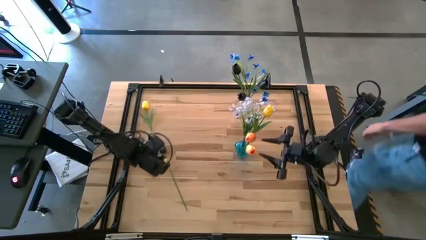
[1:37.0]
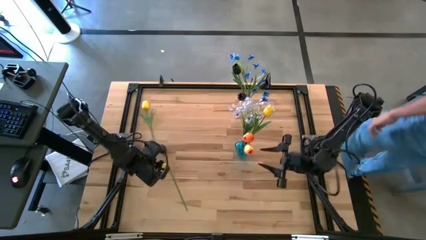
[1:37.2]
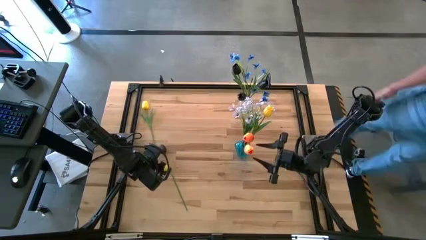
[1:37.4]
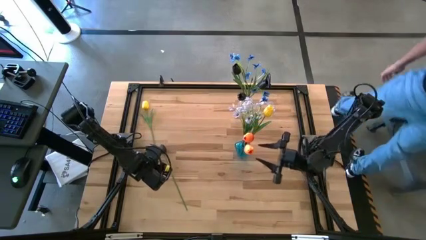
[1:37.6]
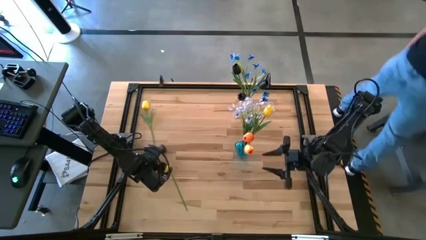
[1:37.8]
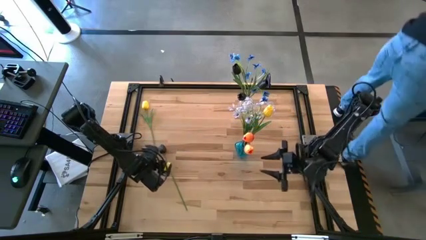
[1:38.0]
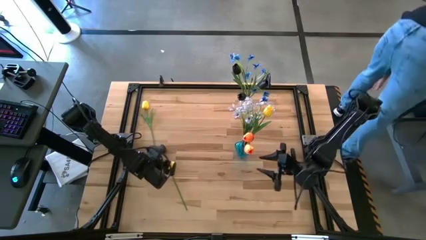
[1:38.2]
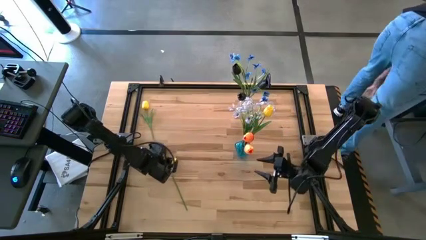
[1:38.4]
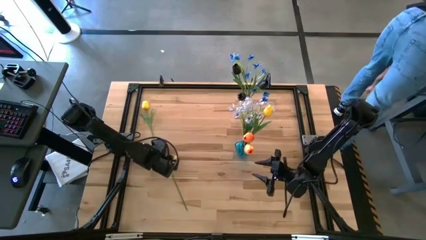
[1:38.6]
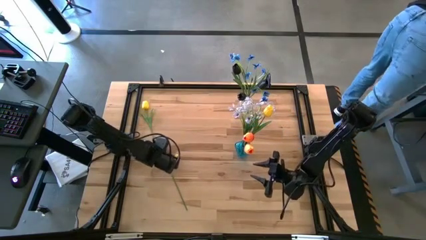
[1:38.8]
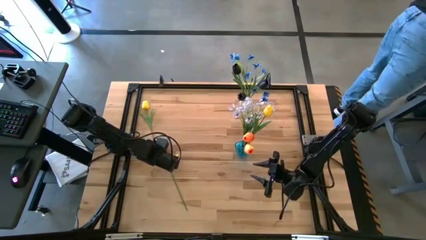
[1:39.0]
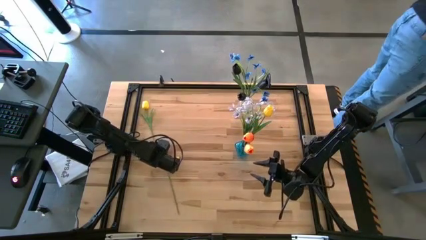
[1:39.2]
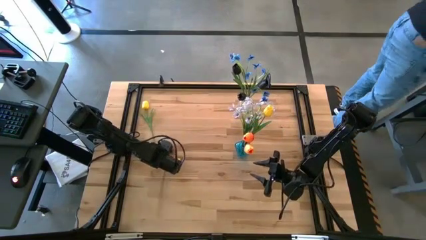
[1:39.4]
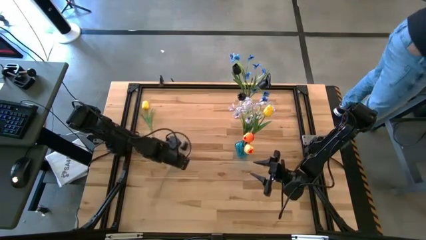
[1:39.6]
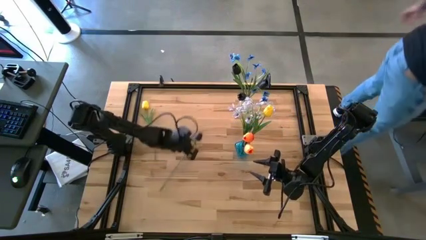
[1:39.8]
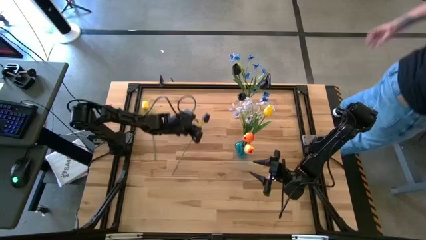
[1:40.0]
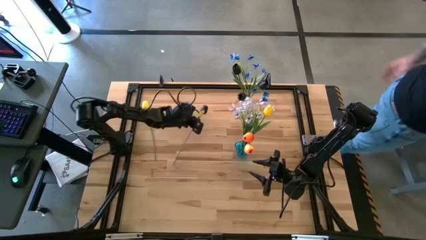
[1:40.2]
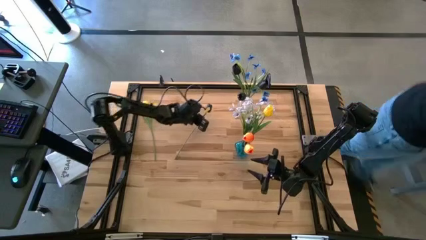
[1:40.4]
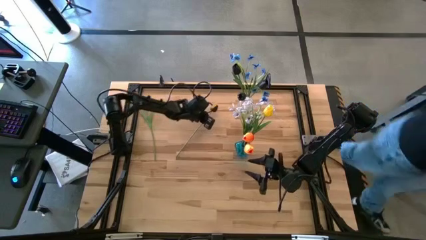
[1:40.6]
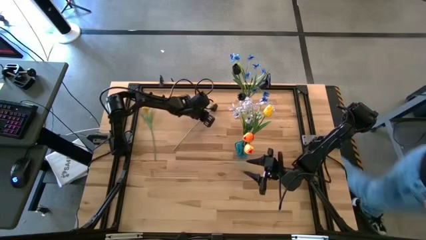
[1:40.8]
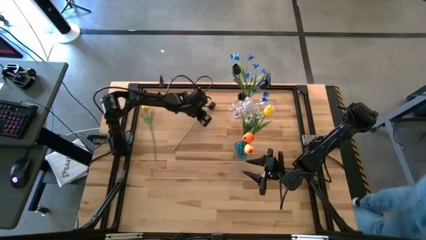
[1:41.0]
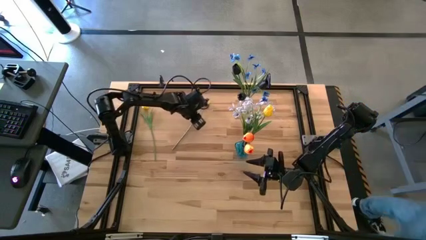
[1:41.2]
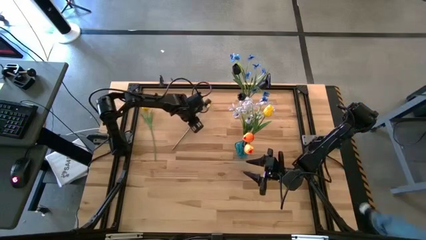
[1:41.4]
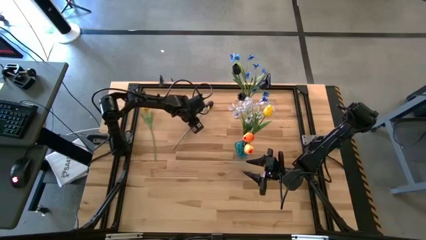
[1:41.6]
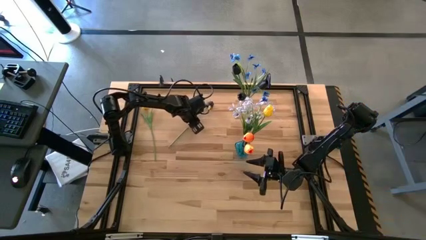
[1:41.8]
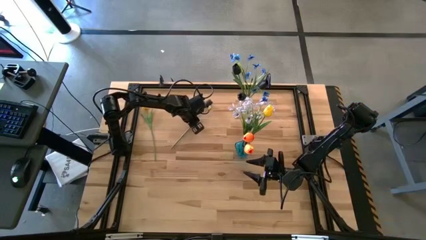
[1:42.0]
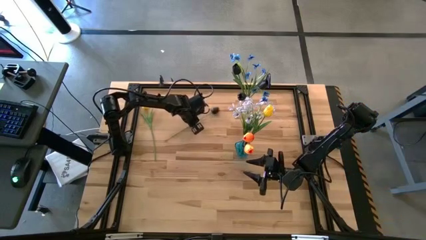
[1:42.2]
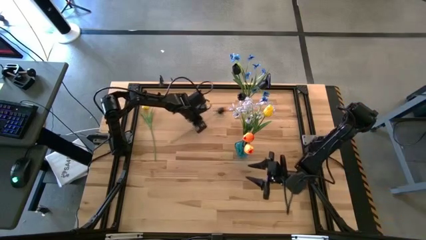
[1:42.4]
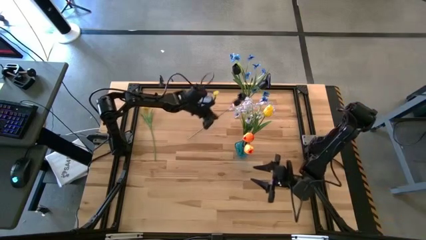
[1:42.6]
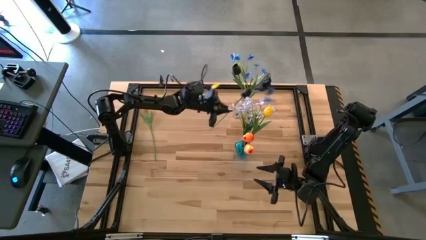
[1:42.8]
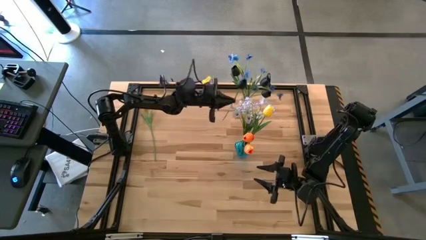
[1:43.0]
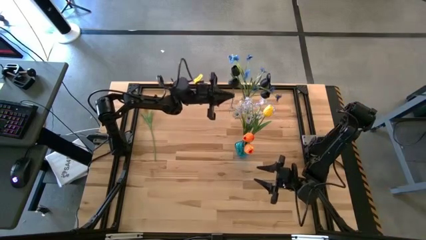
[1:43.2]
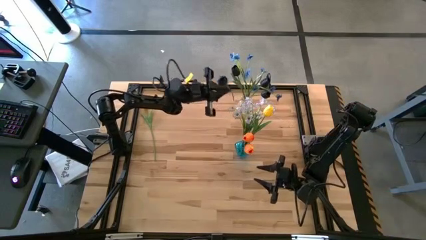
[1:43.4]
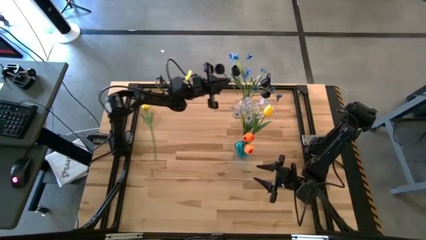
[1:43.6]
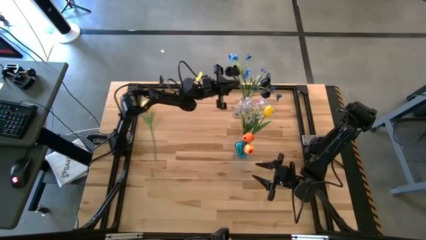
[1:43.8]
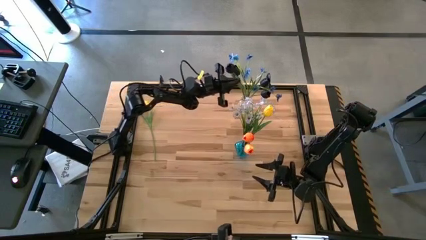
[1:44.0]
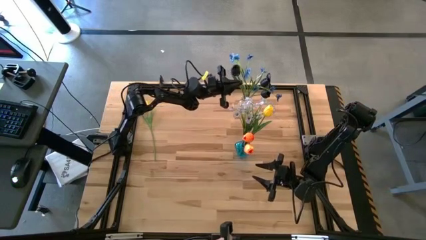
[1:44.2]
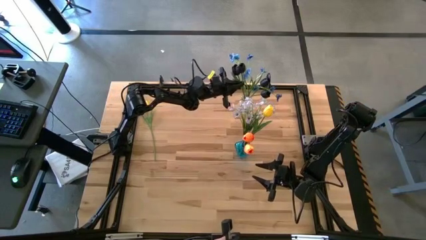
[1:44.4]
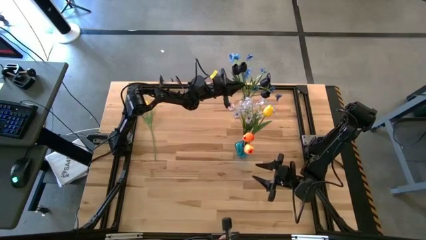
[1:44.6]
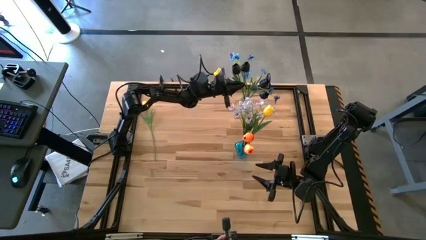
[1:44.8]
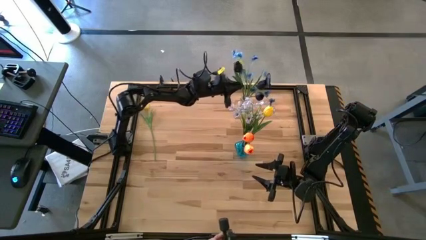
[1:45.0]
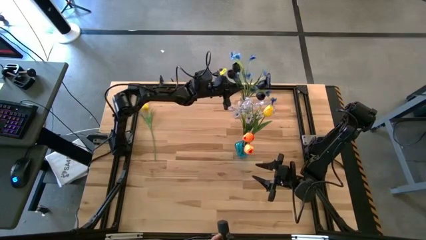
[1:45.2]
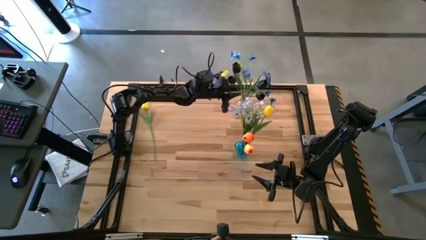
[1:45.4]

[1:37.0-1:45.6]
Task: Sort flowers into vase by color
Put the black tulip into the transparent flower vase

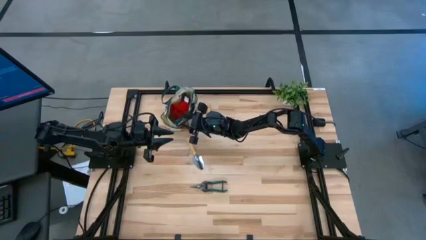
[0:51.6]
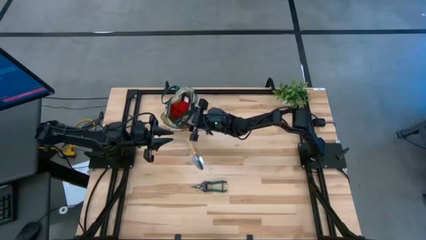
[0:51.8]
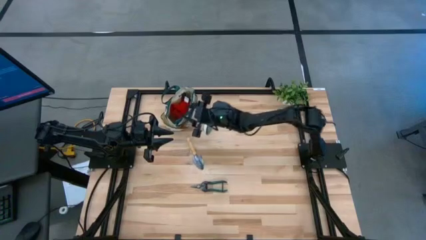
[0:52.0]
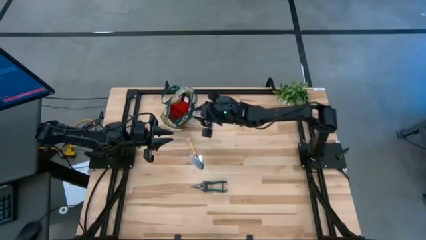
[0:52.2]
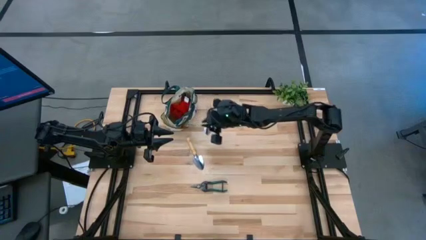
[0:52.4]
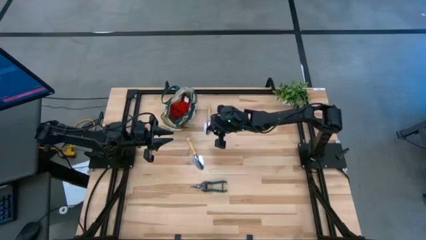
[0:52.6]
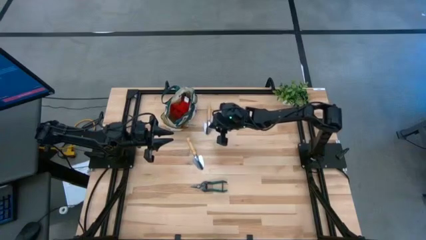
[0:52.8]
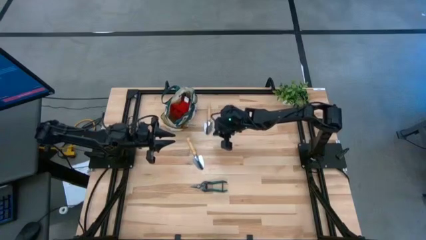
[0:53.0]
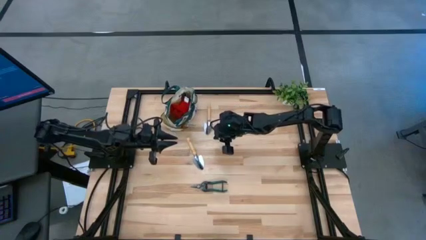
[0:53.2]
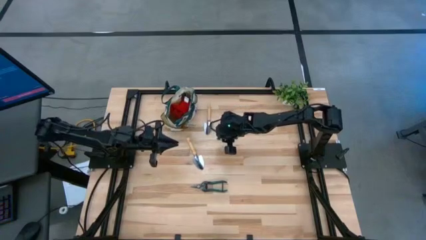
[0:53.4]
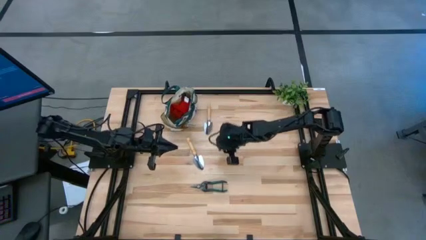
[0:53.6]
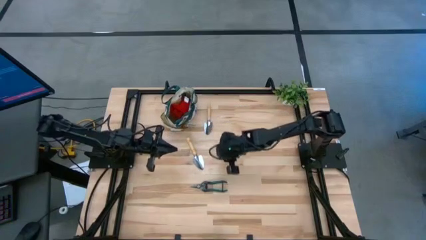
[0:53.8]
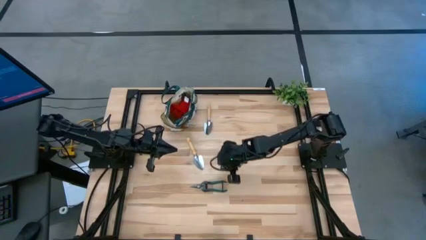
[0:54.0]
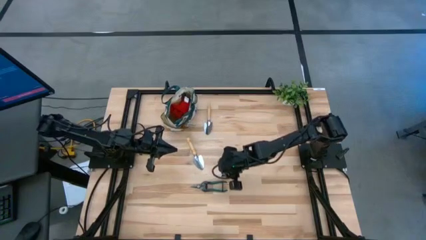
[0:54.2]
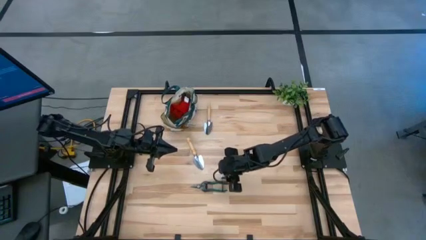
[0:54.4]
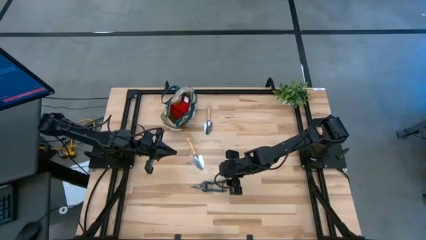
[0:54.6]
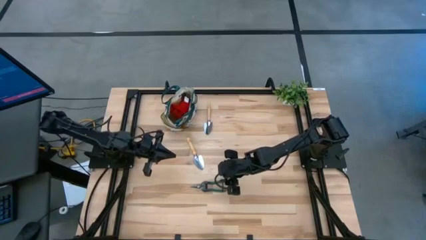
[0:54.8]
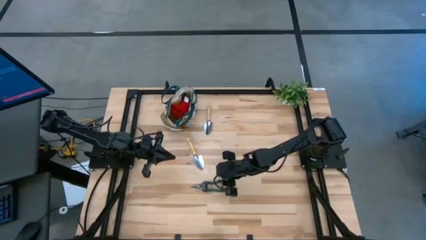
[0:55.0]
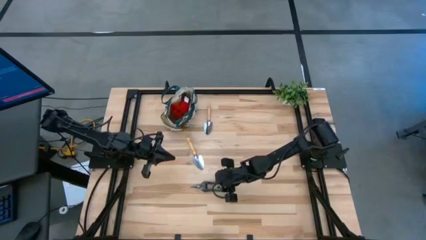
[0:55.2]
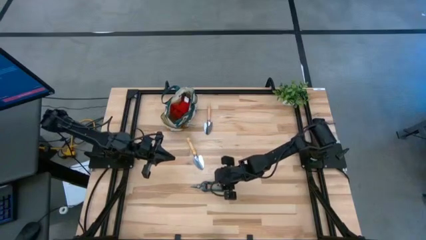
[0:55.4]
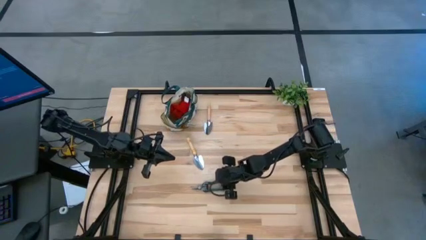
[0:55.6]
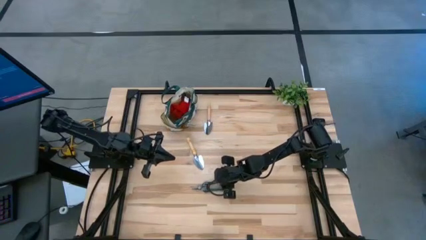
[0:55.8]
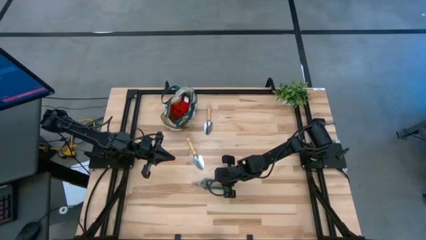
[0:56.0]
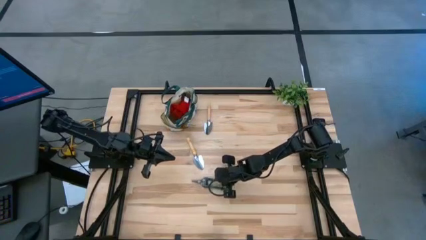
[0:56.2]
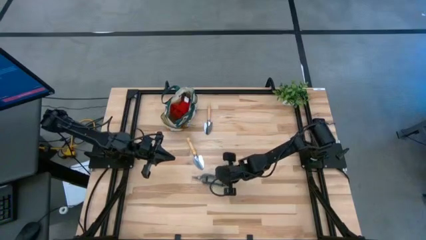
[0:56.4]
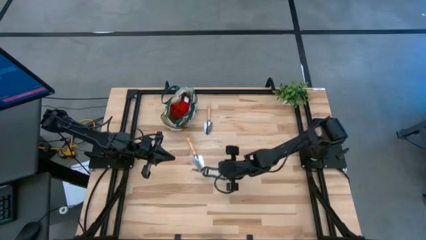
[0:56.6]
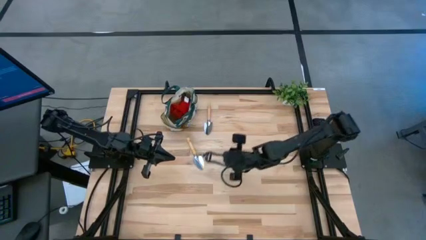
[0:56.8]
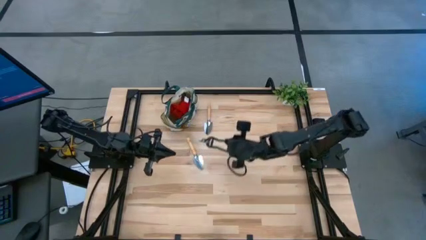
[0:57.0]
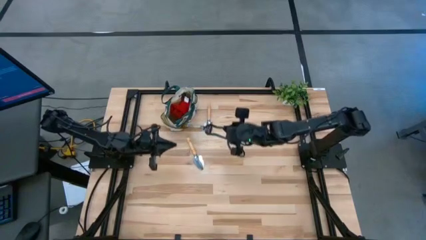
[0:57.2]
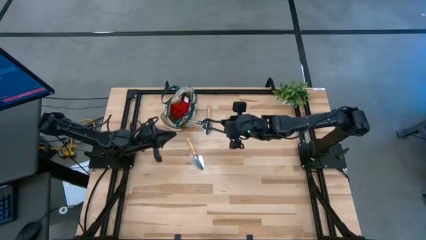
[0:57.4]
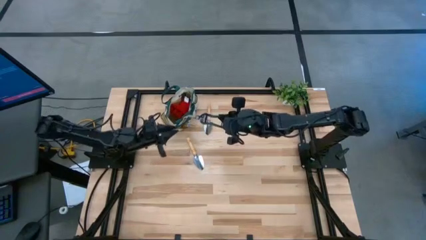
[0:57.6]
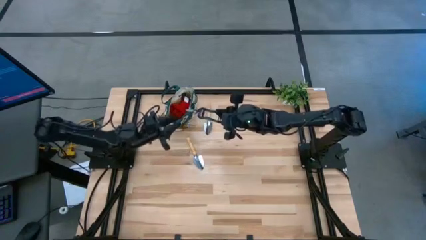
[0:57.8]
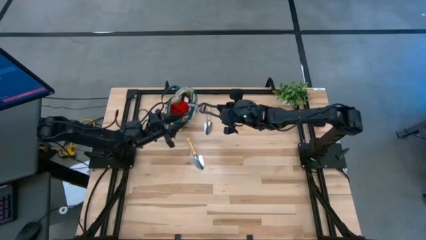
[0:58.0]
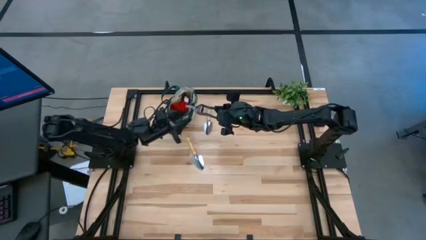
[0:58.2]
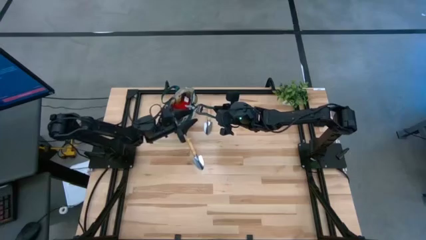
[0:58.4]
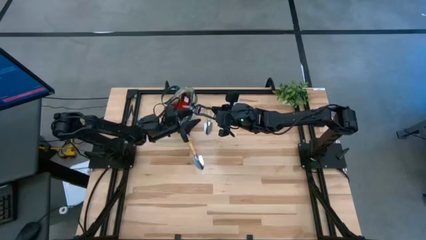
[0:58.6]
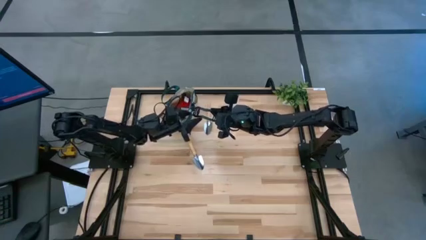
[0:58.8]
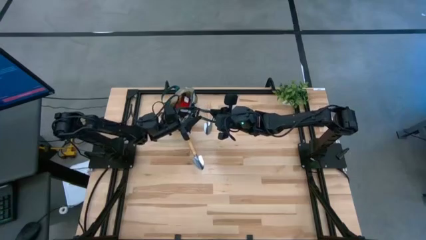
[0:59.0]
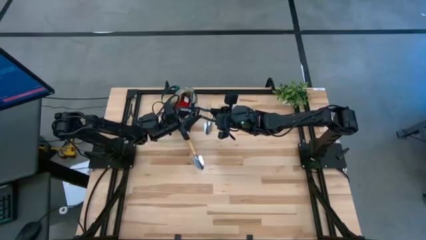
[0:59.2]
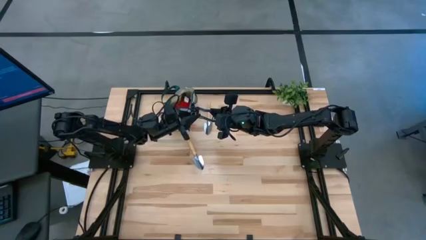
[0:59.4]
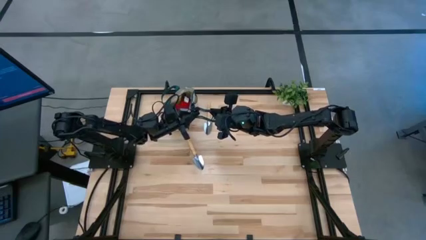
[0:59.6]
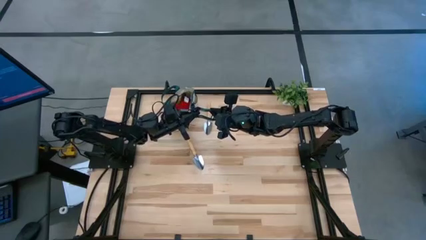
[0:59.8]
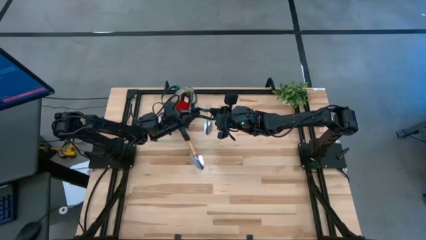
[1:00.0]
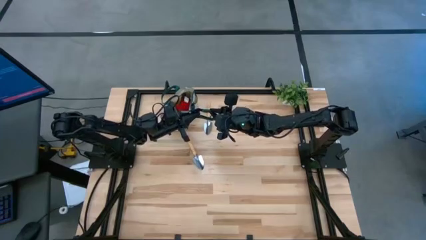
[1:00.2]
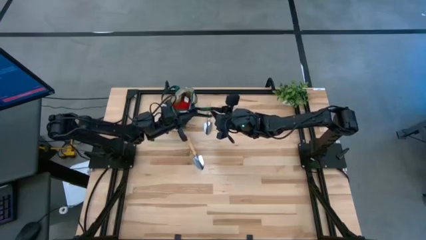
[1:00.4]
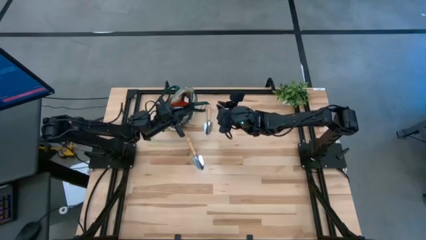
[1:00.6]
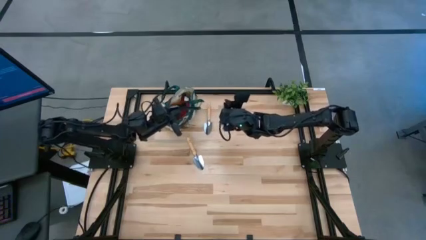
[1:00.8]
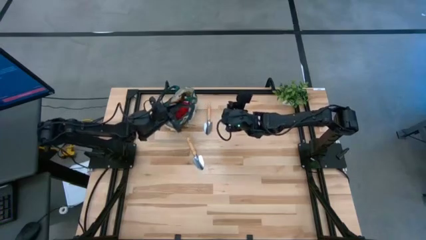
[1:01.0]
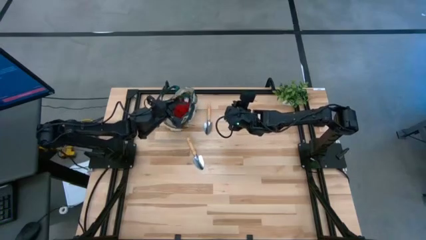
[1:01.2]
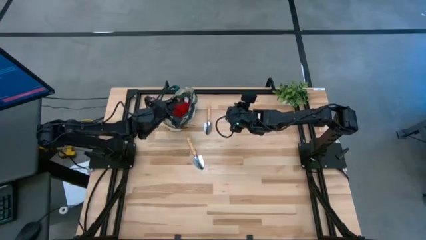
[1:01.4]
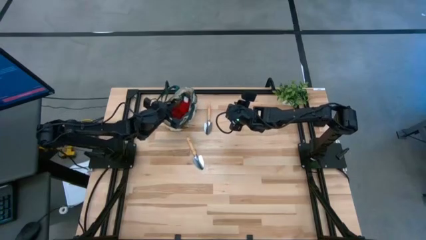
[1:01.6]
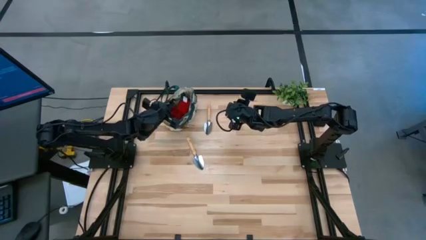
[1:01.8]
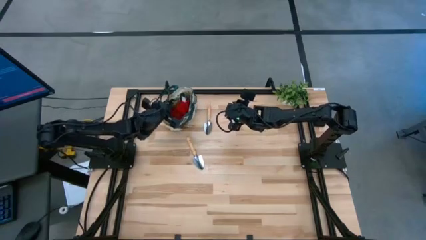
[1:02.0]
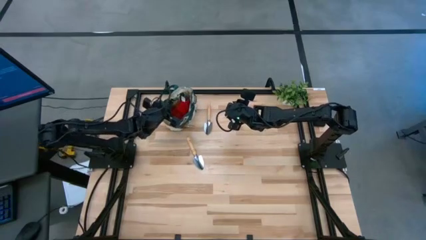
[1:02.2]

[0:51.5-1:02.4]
Task: Pick & Place Garden tools in Gardening bag
Put the green fruit pruner into the yellow gardening bag
